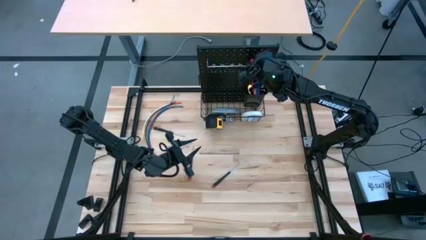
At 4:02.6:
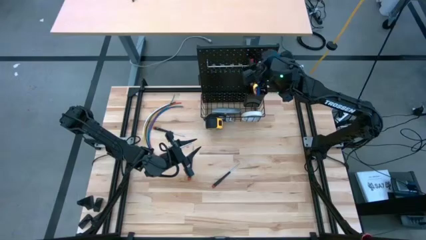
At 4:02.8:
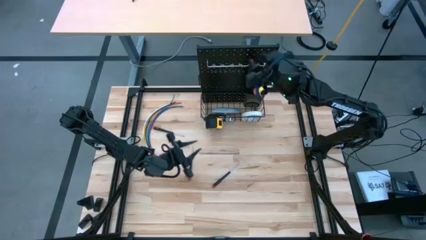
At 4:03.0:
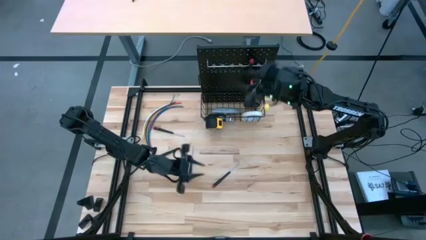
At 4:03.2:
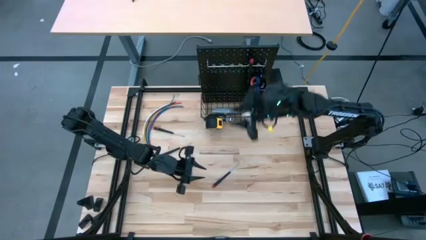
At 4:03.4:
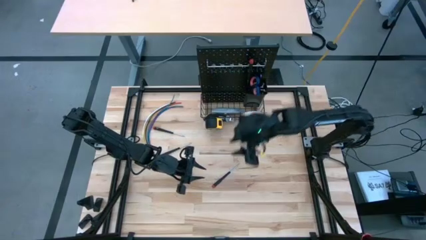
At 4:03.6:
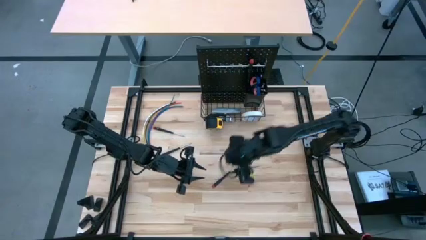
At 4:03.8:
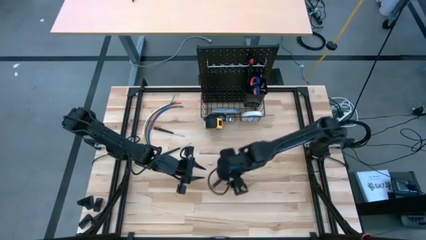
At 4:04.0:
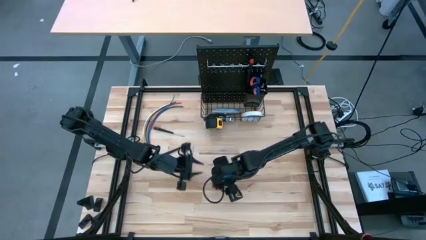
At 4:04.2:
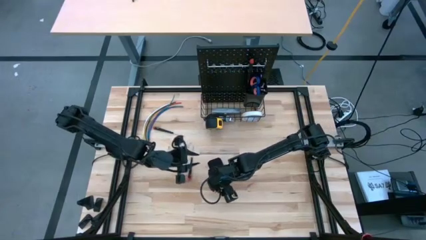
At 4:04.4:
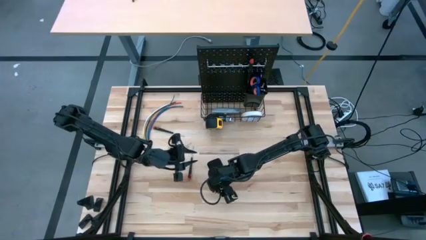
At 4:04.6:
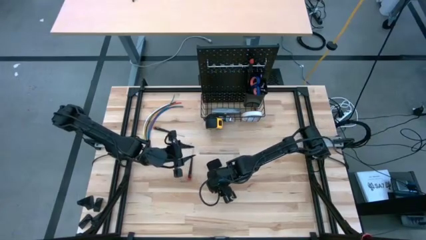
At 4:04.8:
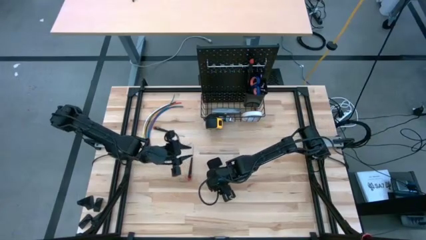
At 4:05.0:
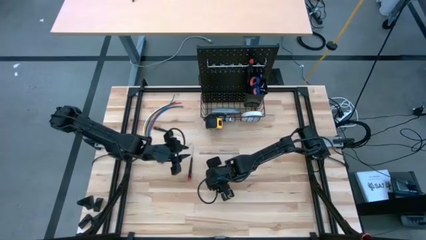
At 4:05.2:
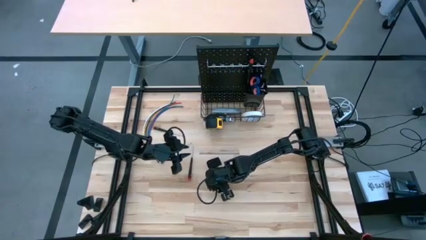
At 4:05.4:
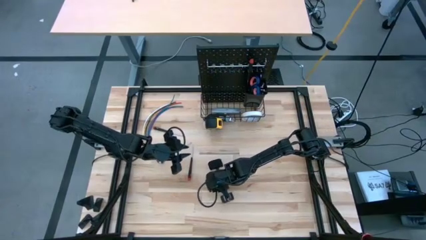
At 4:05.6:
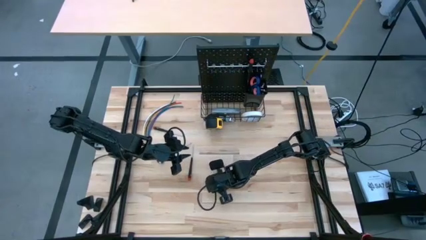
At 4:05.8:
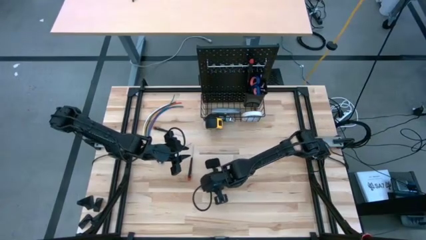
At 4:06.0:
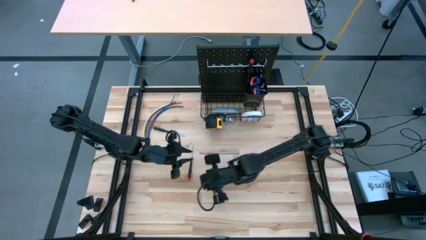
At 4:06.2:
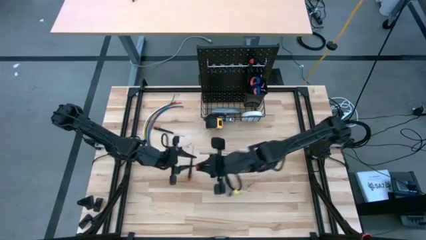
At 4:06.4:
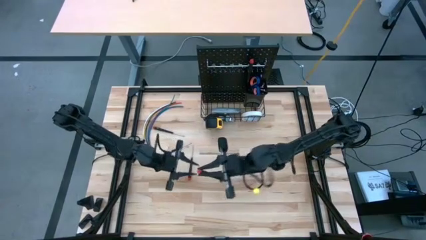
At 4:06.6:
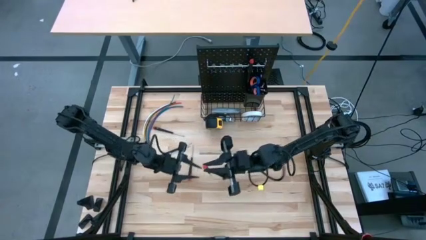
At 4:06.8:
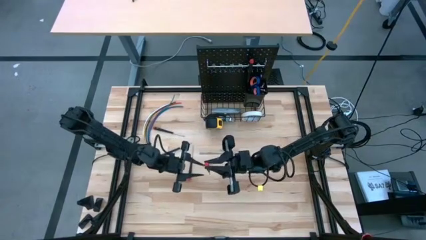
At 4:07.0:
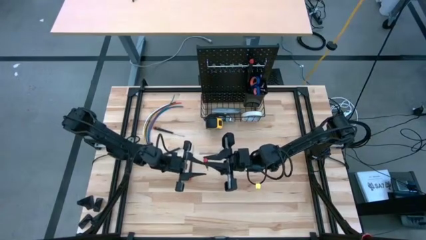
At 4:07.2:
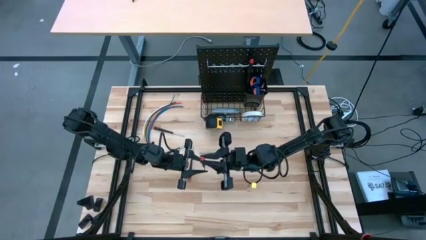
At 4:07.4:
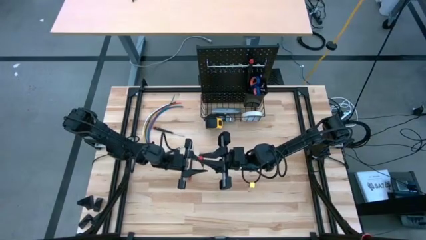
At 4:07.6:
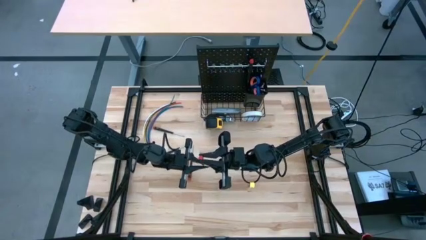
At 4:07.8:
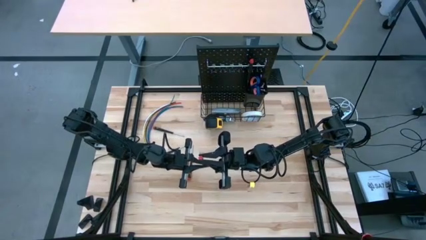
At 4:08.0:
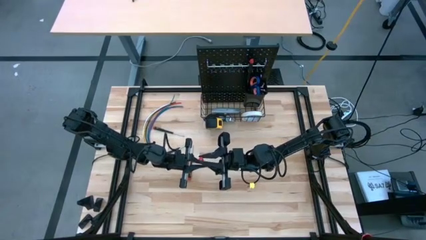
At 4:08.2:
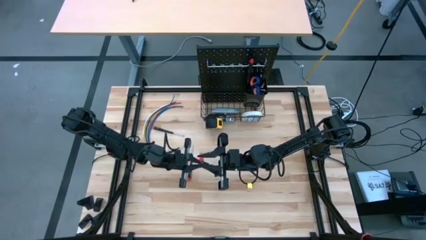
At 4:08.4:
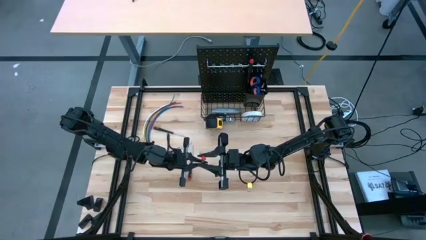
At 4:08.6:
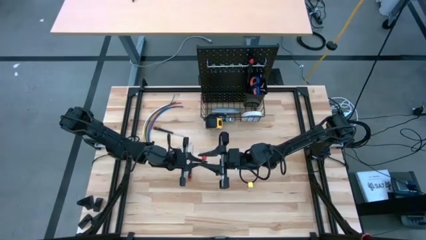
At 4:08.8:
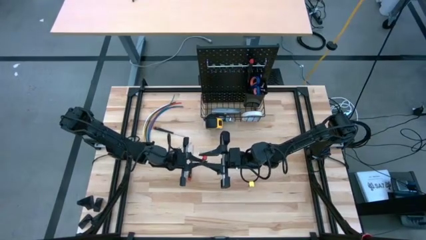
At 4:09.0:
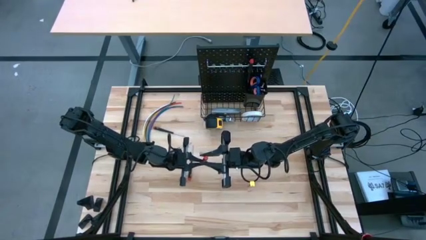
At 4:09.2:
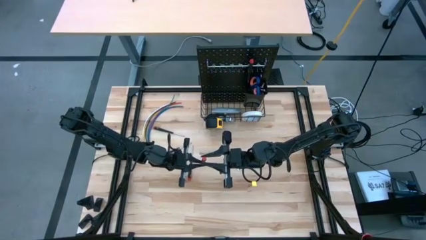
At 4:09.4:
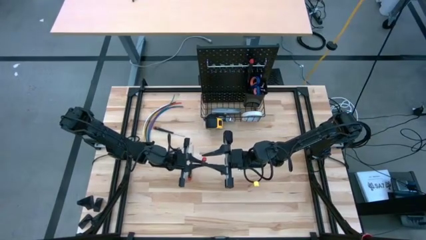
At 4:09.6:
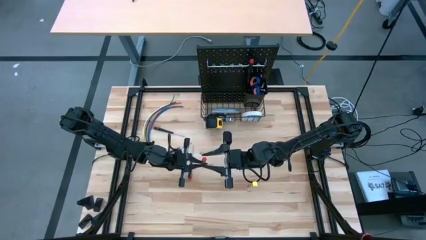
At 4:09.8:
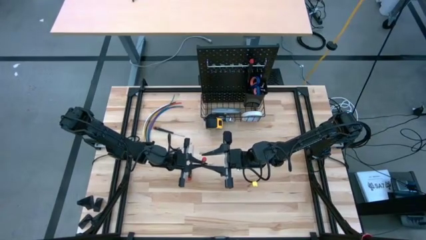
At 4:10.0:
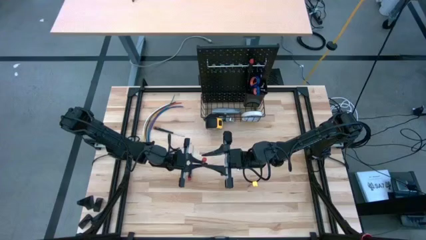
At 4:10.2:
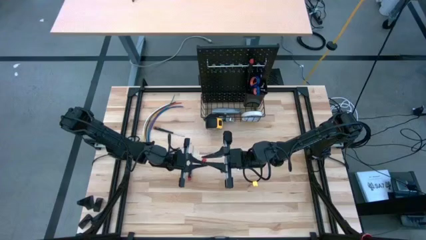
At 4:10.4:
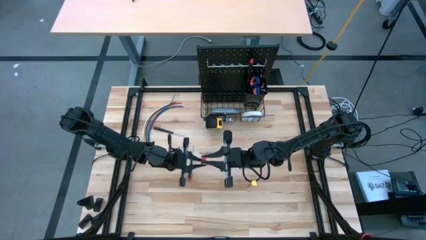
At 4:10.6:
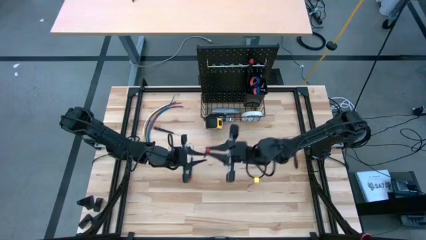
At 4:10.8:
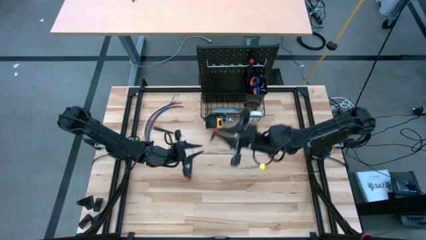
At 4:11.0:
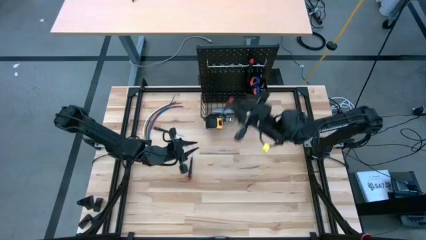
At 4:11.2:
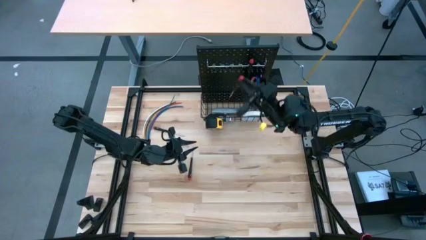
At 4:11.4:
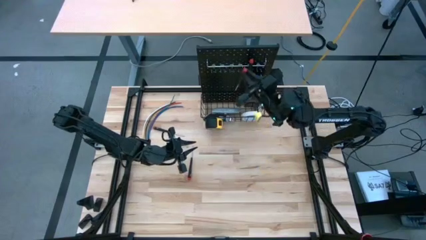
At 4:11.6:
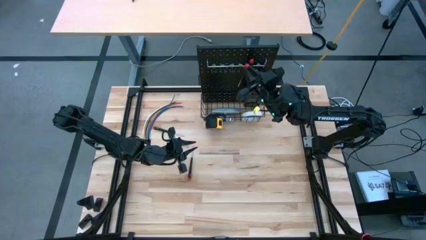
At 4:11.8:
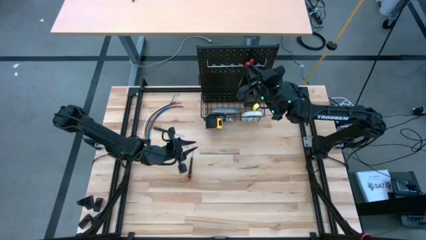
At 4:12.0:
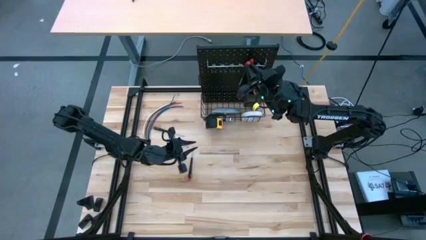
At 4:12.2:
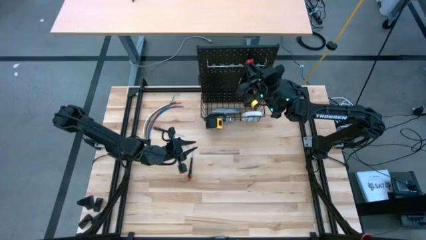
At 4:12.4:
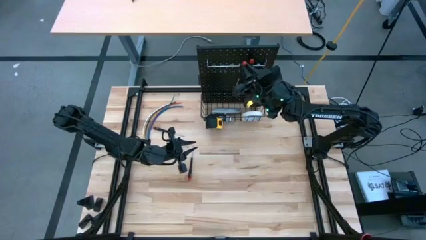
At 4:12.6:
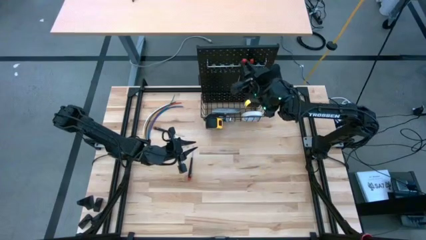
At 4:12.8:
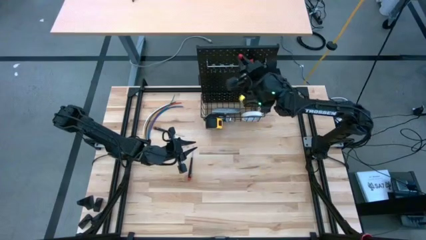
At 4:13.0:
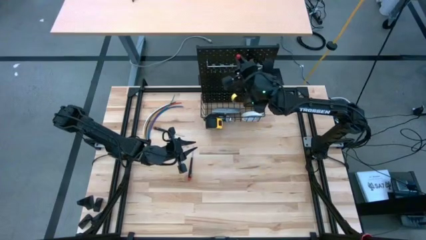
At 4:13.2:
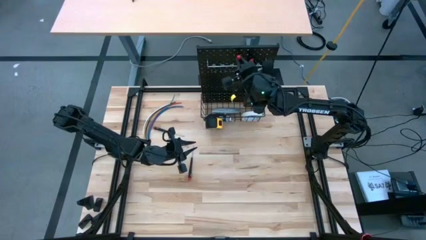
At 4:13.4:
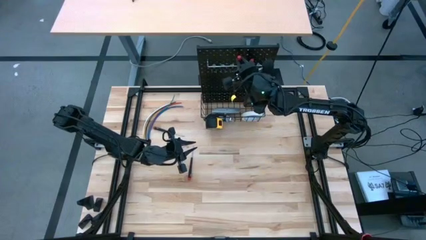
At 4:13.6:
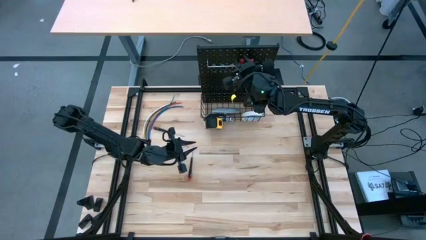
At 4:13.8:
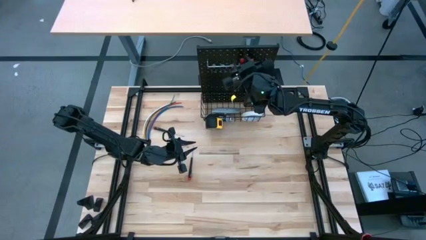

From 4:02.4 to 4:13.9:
Task: Hang tools onto peg board
Hang the black screwdriver on the pegboard

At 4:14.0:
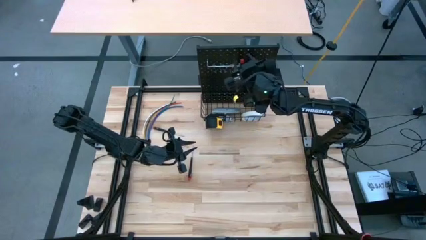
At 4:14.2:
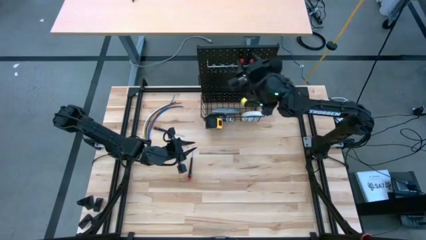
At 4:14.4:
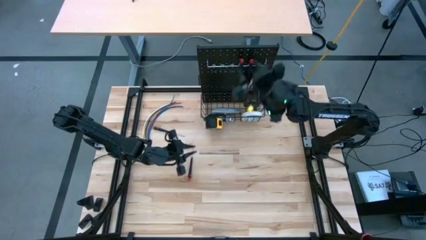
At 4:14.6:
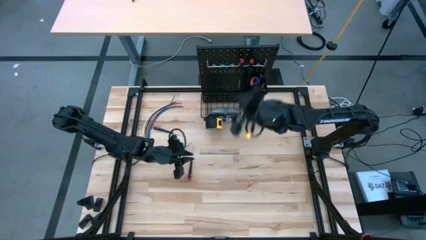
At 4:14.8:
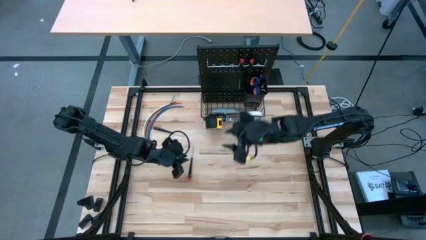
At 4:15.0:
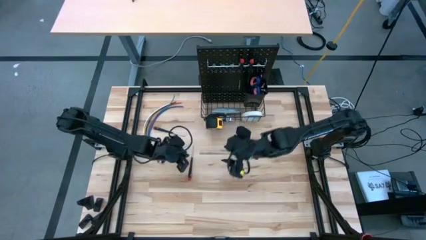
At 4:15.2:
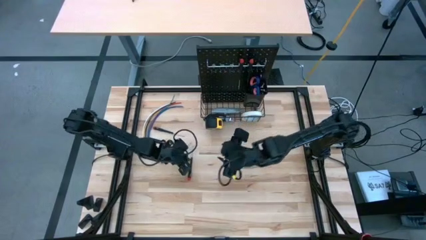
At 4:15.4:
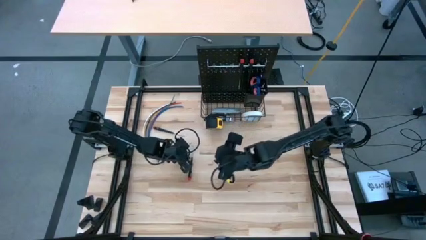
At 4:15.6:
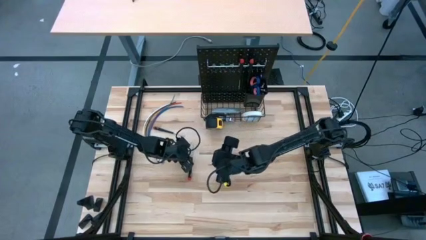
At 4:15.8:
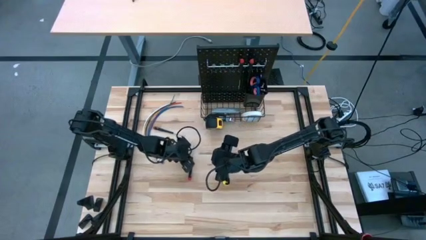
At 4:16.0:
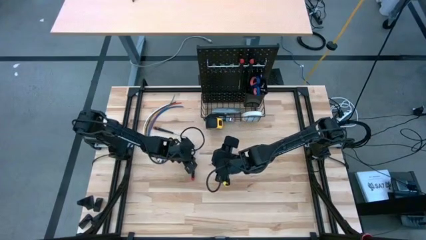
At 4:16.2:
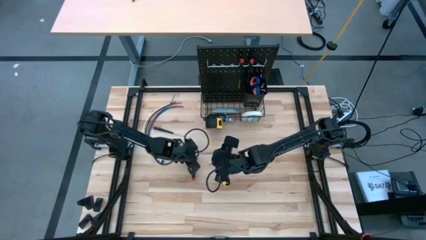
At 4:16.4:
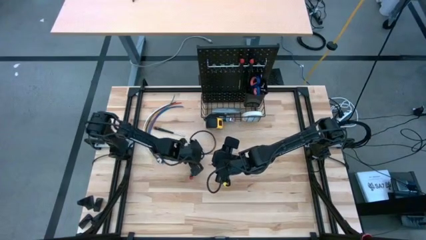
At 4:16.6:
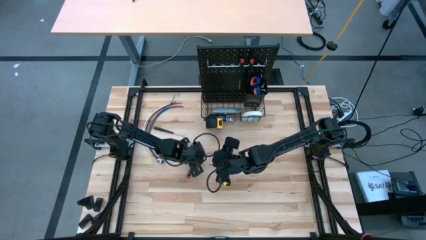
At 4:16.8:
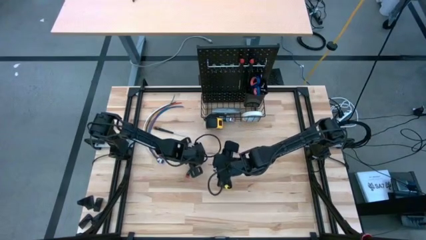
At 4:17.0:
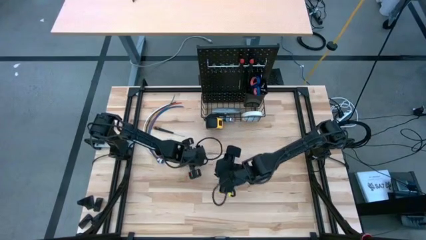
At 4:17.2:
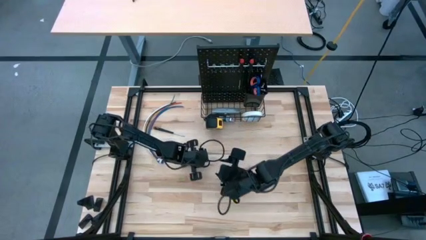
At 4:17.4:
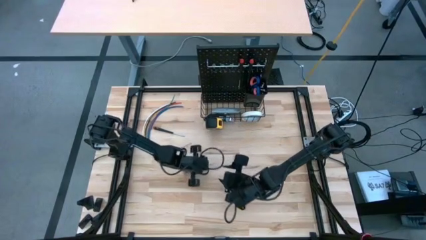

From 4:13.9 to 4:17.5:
Hang the black screwdriver on the pegboard
